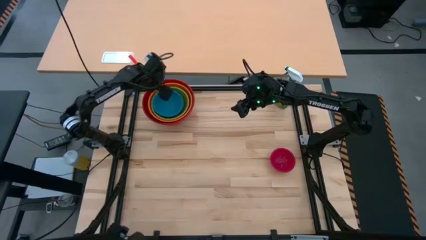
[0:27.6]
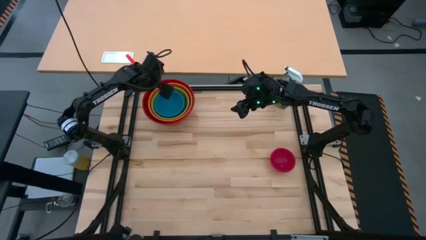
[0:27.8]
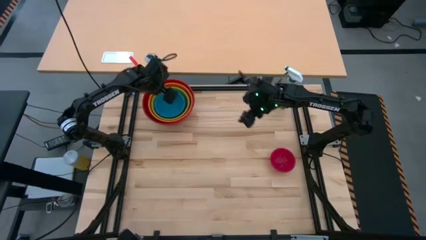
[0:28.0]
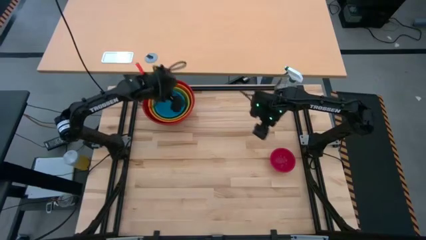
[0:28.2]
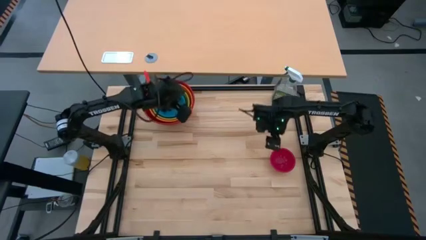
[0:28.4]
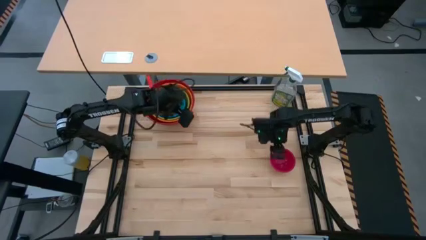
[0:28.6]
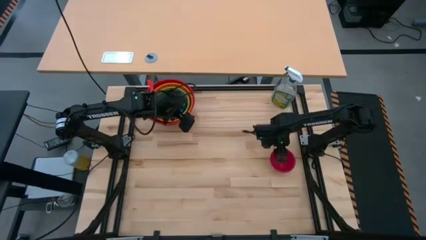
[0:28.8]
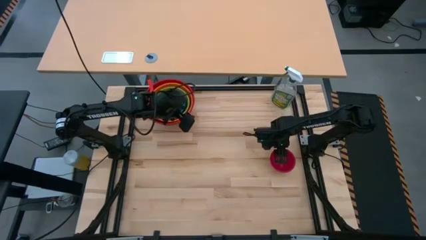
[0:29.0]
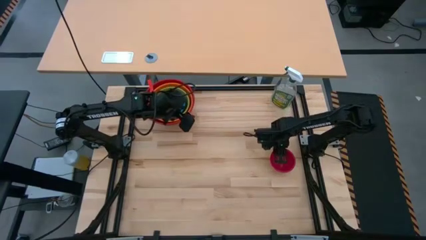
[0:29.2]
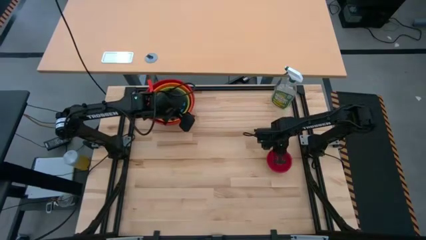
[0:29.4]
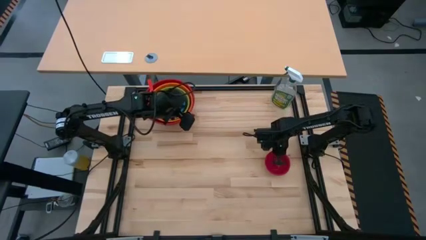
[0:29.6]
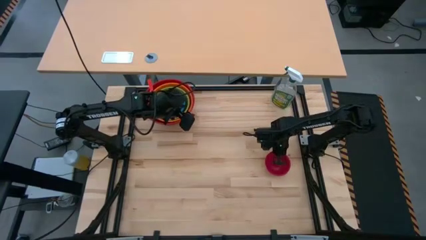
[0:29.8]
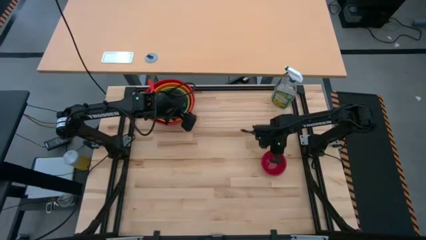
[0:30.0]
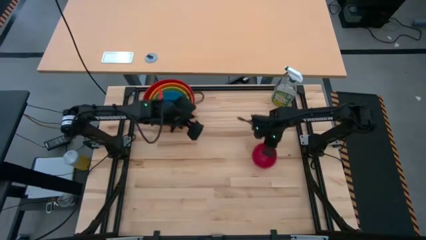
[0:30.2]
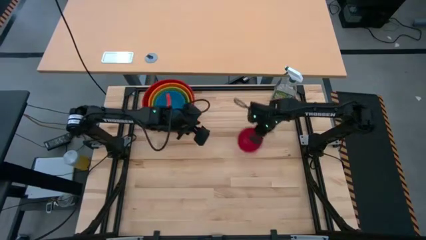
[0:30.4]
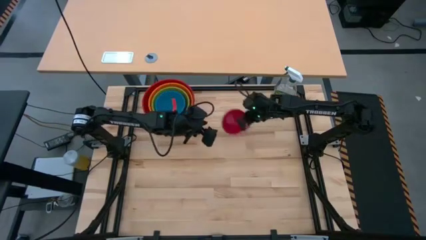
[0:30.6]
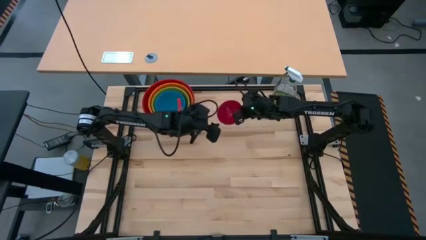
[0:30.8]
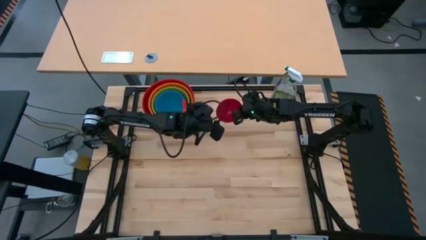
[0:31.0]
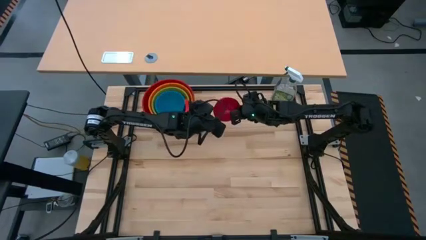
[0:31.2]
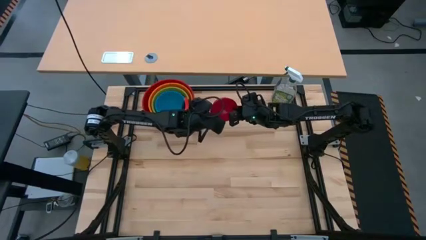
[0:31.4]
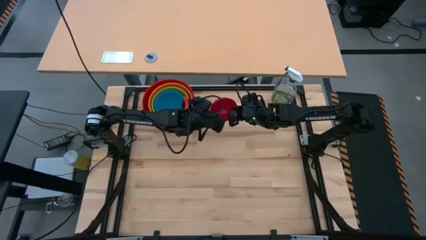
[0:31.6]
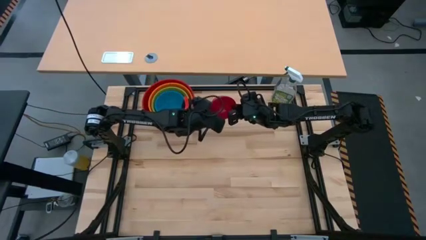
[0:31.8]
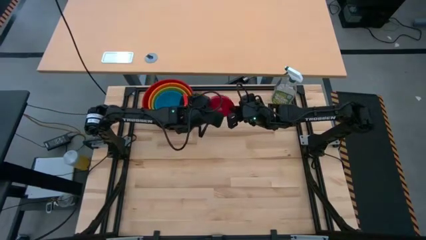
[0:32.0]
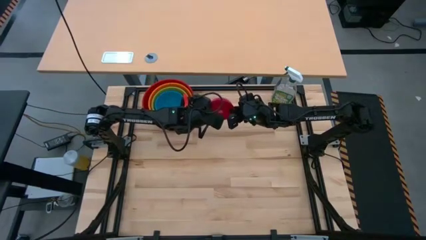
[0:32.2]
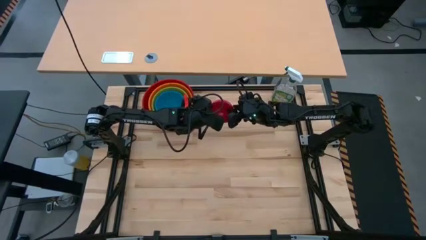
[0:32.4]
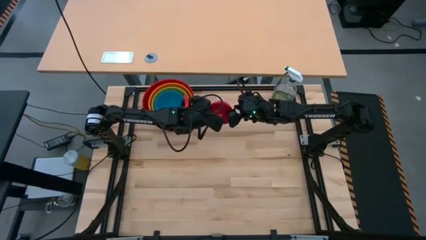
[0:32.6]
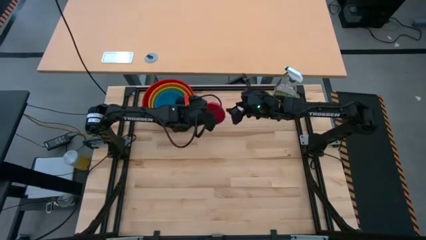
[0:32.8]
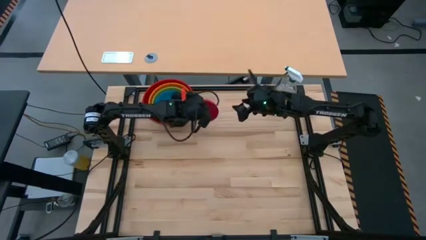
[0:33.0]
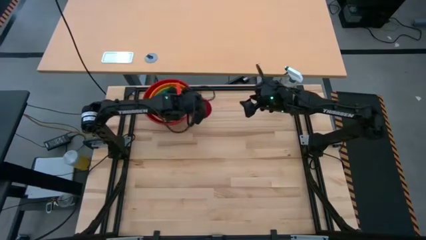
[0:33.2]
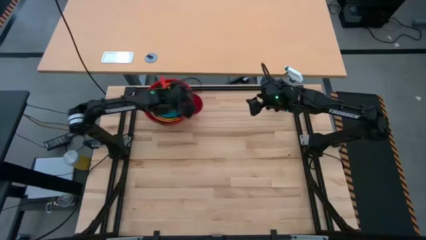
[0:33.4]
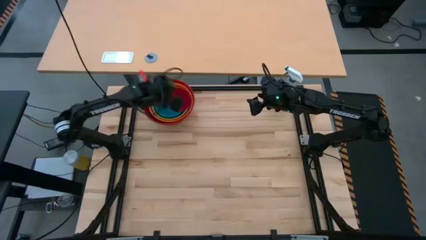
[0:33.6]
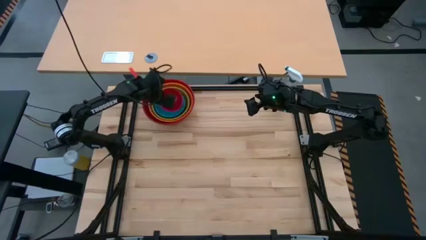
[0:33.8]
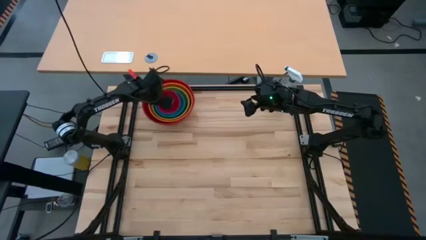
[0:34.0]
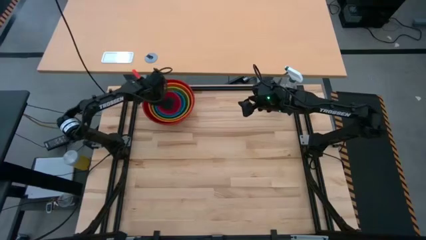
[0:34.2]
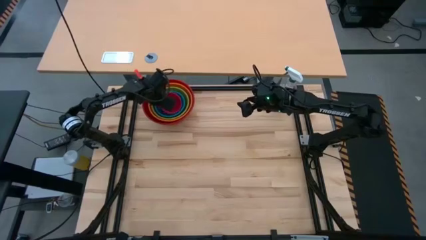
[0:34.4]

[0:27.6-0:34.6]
Stack the red bowl on top of the blue bowl

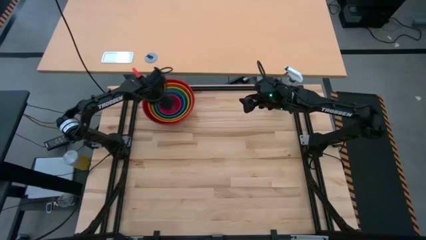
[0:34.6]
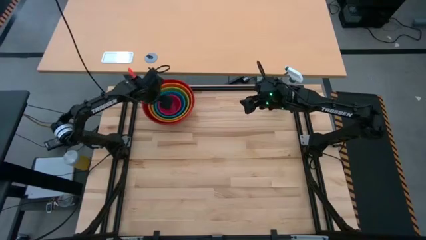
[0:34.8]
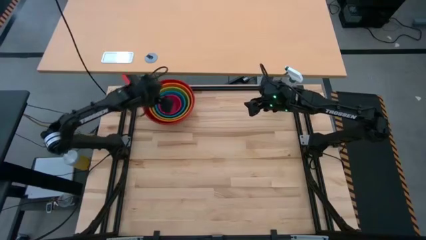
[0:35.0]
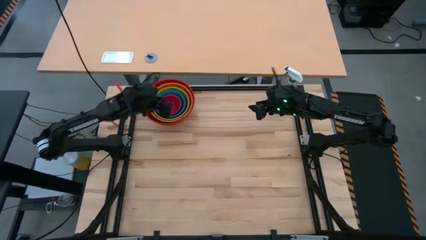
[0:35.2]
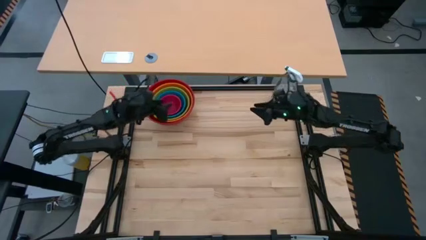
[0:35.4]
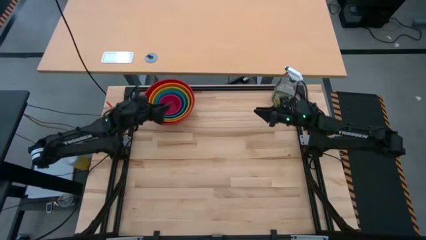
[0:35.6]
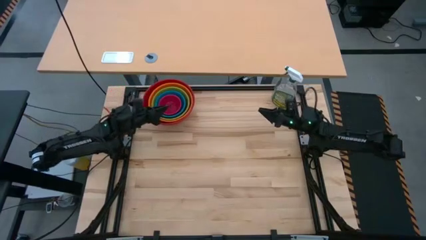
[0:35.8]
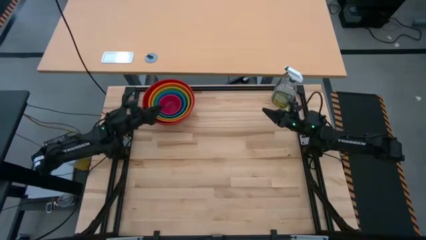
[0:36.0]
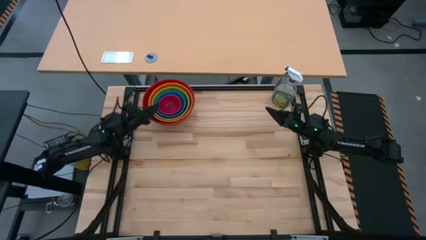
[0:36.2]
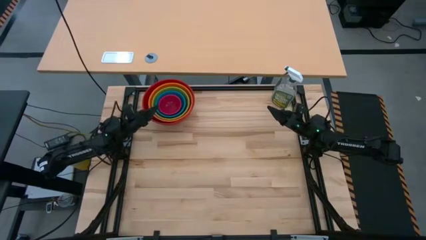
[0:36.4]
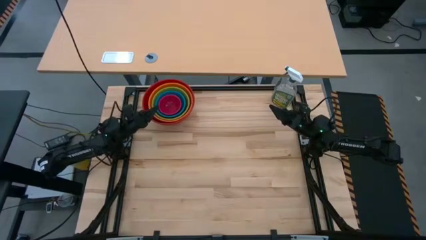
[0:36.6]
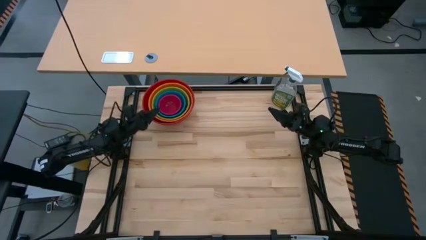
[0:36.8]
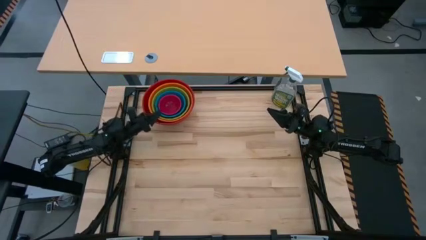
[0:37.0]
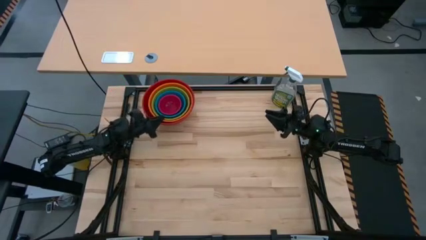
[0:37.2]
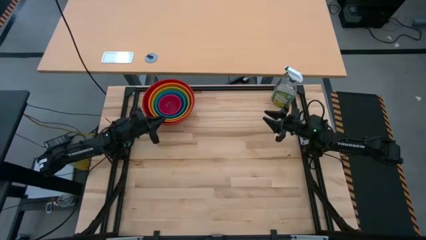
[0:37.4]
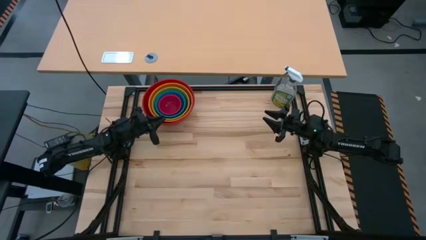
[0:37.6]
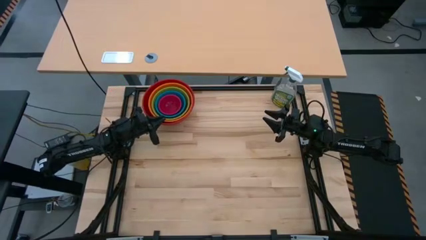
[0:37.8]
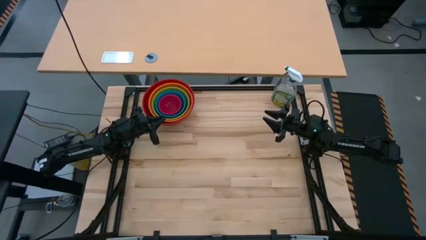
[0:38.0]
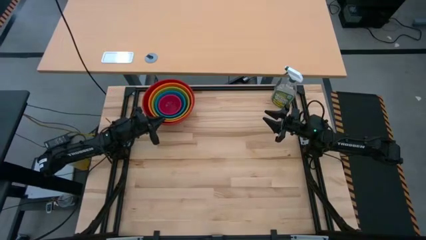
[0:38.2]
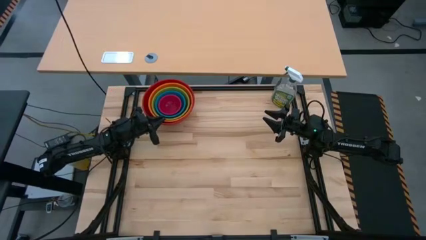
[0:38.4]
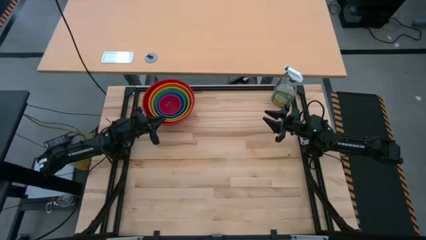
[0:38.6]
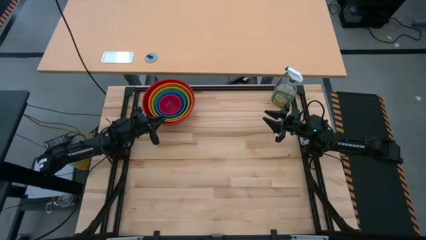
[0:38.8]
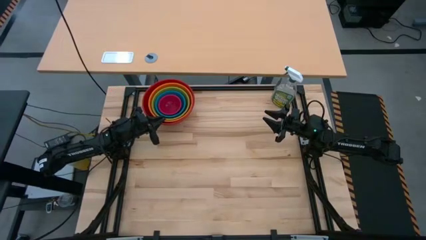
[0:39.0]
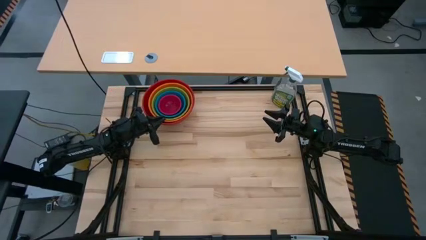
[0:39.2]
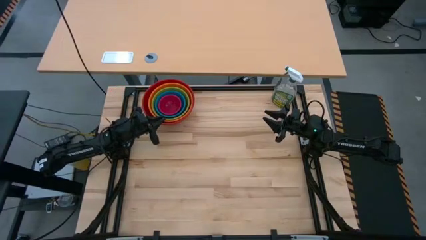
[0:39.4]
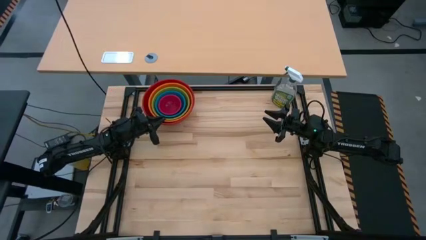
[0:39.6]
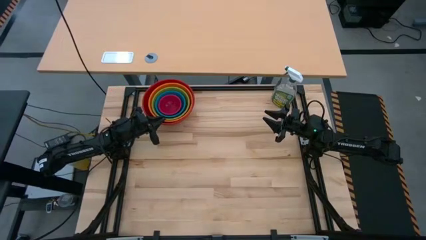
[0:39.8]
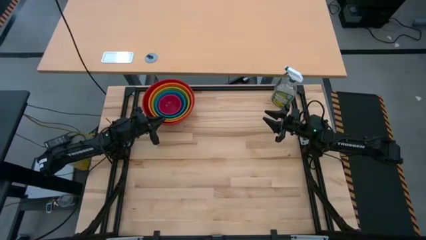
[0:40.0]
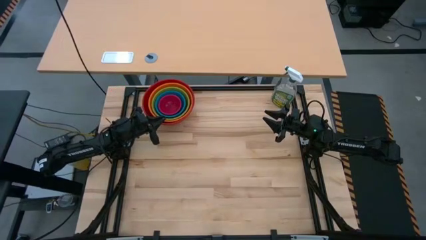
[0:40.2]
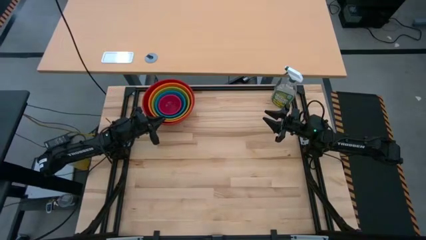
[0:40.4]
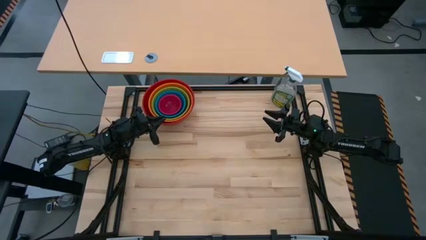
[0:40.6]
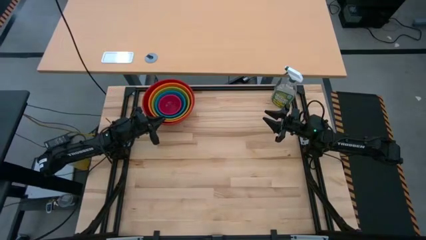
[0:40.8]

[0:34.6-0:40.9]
Return to Home Position
